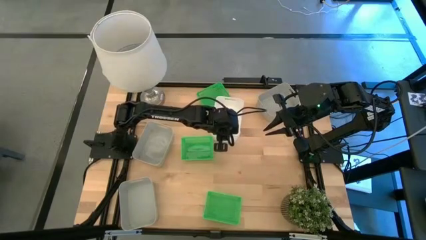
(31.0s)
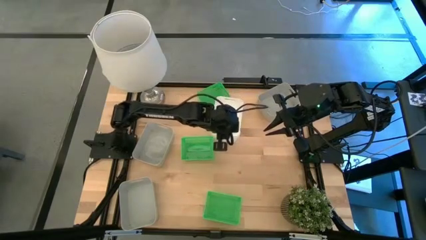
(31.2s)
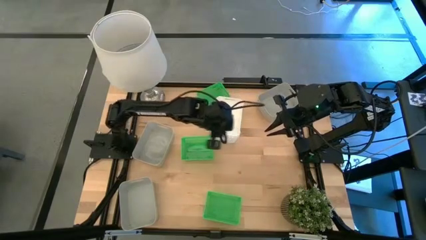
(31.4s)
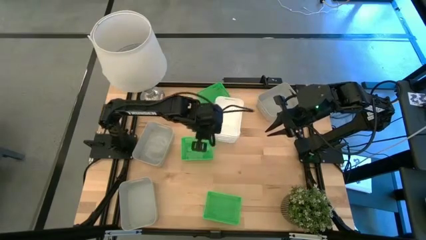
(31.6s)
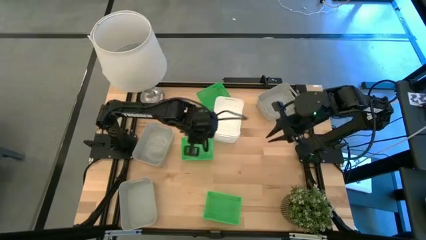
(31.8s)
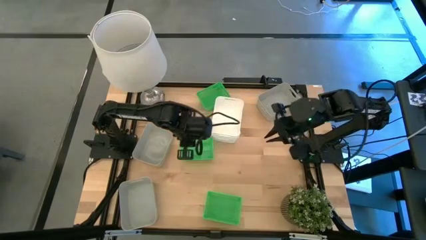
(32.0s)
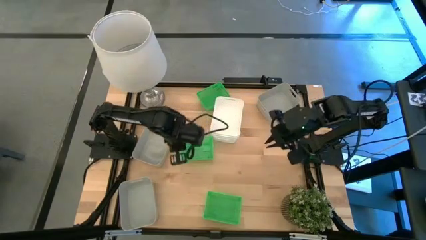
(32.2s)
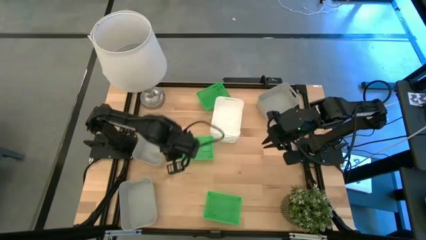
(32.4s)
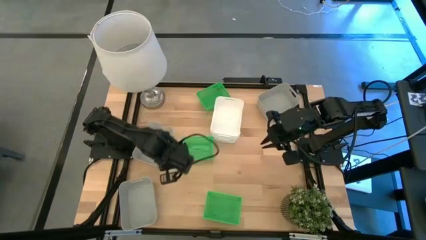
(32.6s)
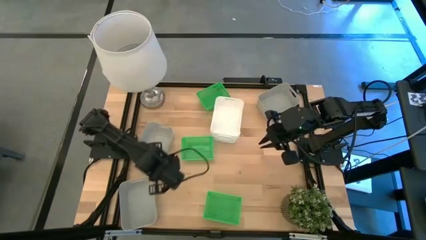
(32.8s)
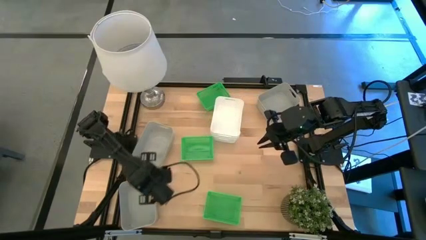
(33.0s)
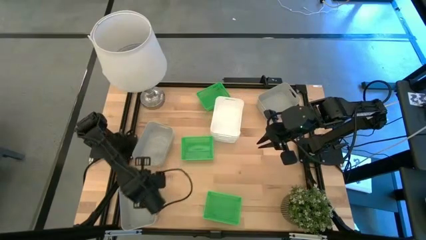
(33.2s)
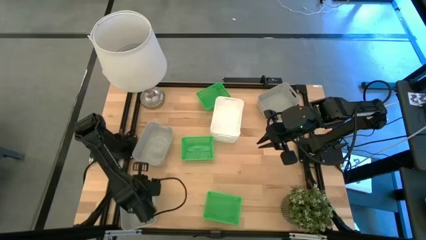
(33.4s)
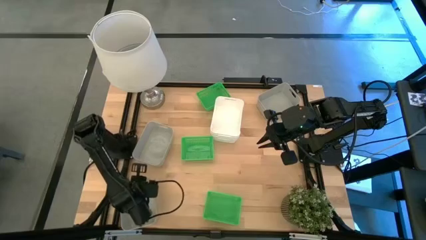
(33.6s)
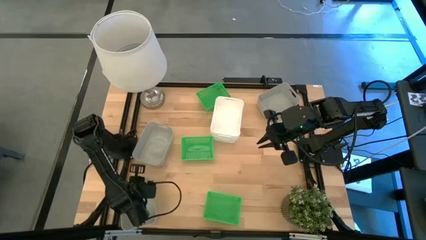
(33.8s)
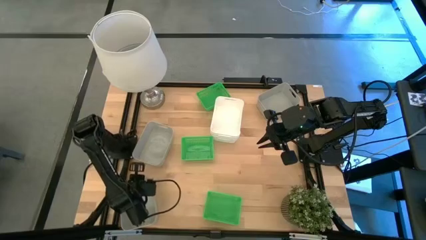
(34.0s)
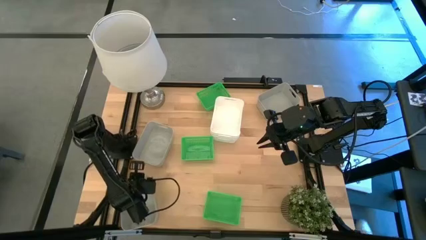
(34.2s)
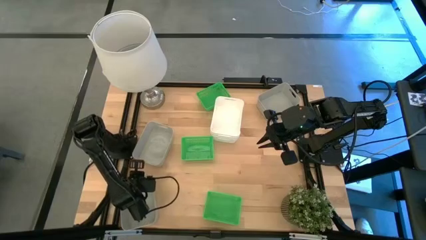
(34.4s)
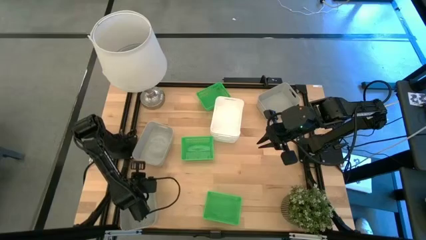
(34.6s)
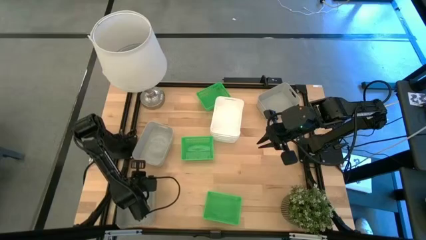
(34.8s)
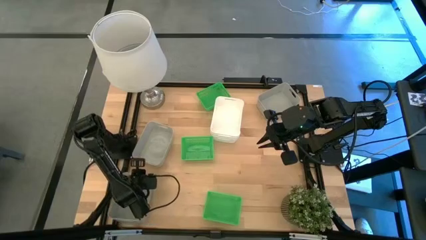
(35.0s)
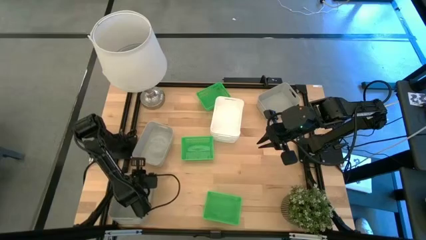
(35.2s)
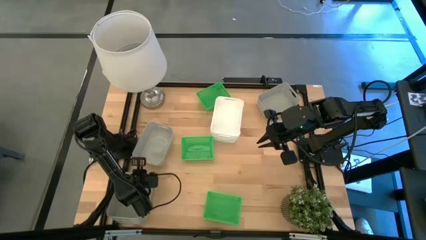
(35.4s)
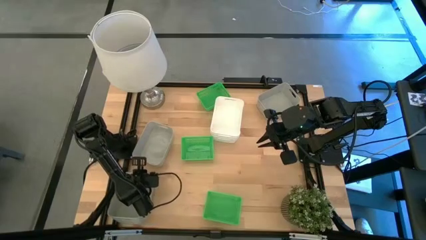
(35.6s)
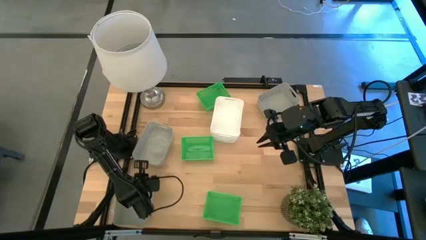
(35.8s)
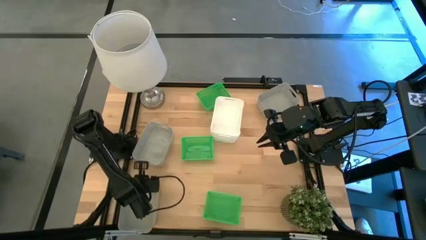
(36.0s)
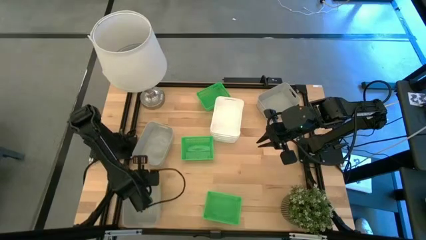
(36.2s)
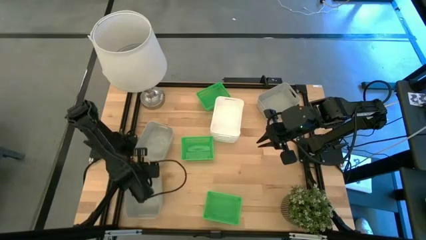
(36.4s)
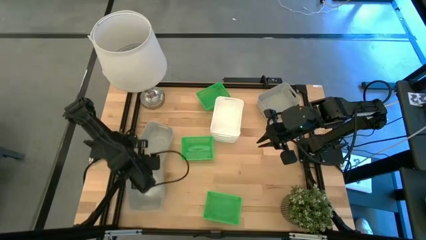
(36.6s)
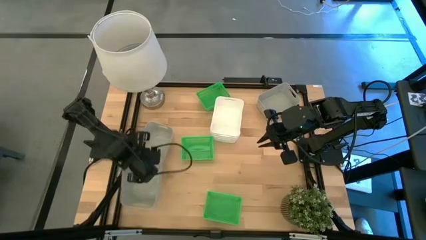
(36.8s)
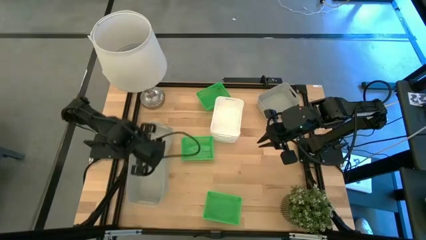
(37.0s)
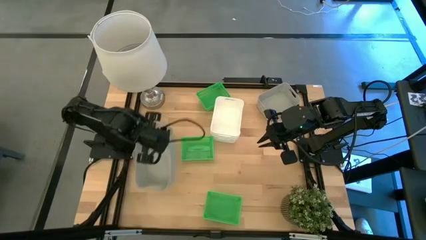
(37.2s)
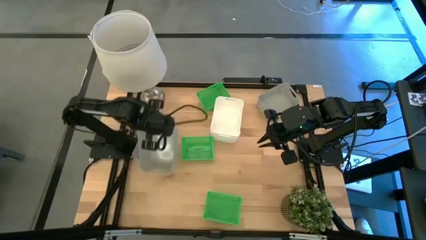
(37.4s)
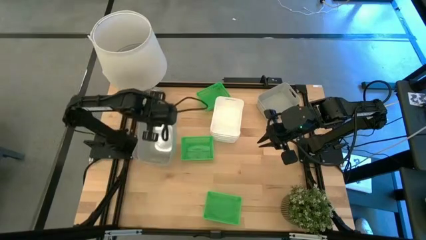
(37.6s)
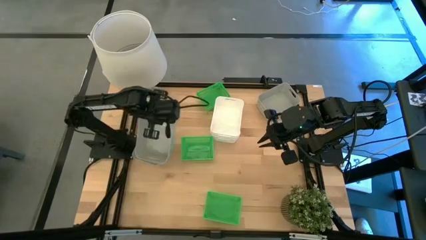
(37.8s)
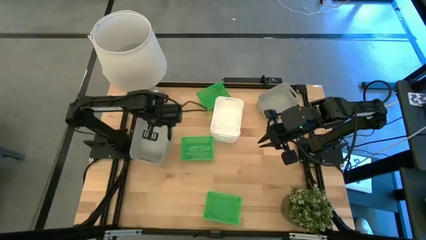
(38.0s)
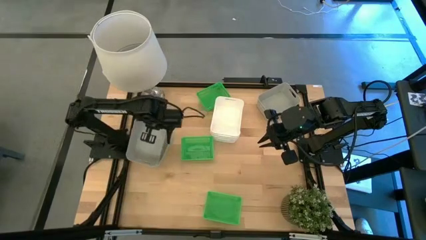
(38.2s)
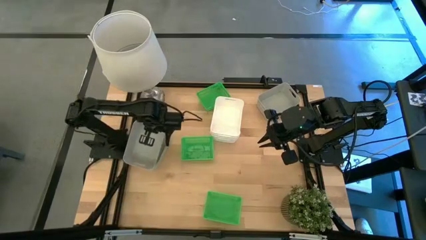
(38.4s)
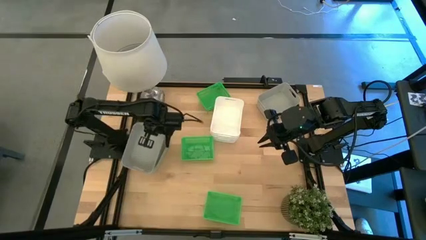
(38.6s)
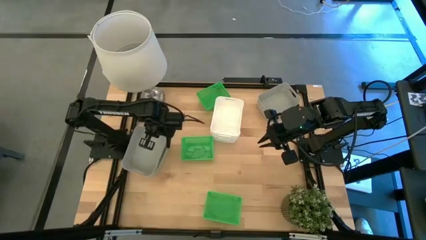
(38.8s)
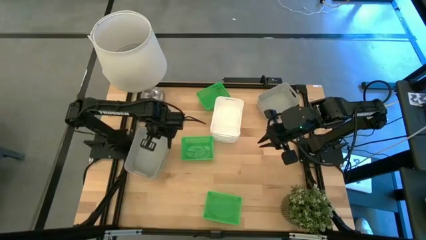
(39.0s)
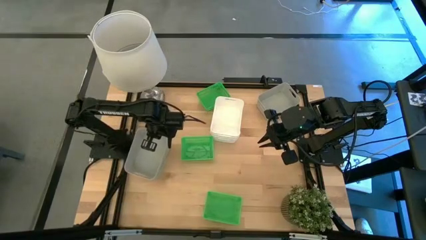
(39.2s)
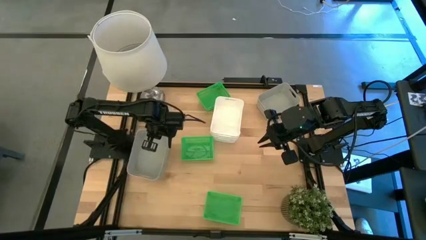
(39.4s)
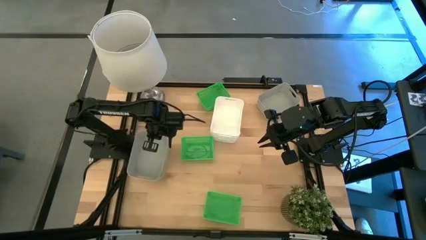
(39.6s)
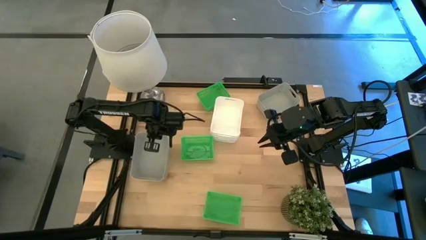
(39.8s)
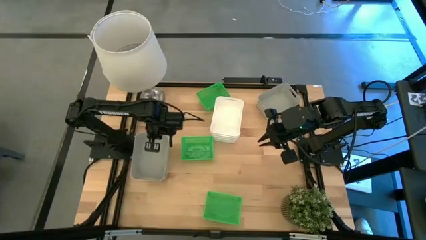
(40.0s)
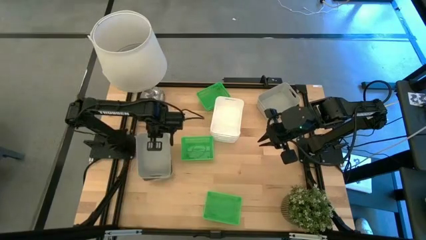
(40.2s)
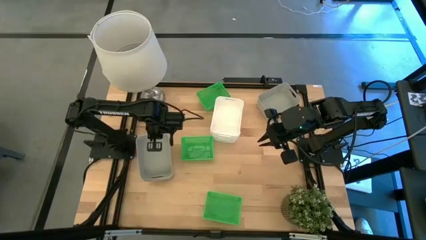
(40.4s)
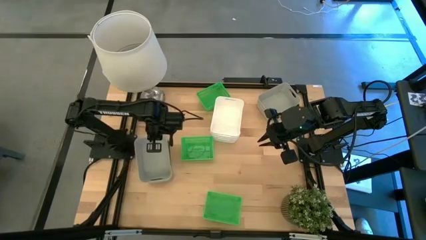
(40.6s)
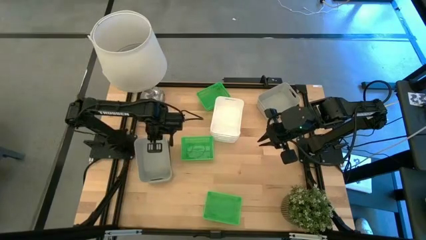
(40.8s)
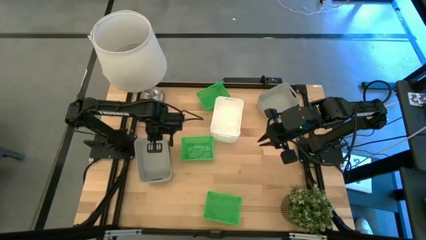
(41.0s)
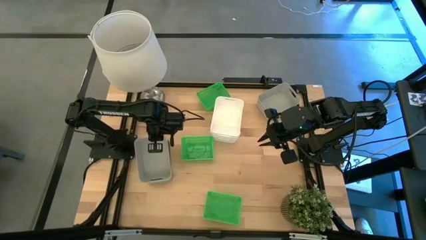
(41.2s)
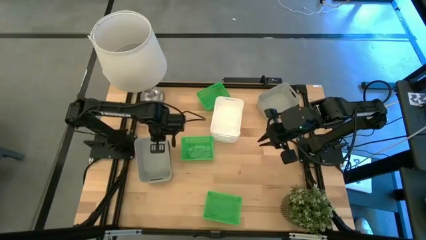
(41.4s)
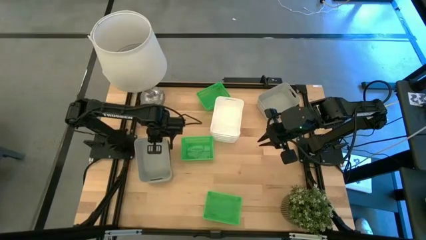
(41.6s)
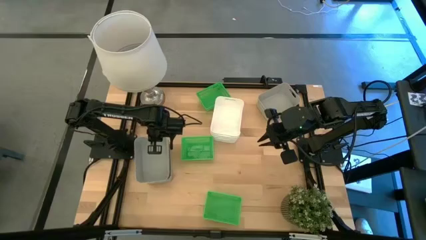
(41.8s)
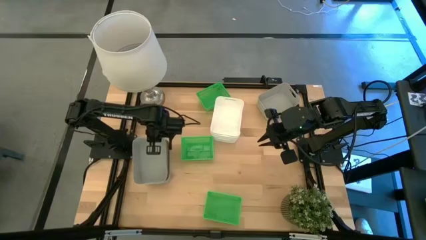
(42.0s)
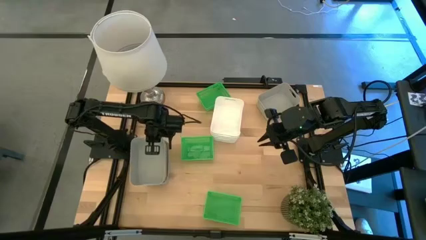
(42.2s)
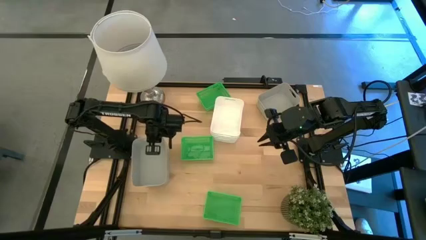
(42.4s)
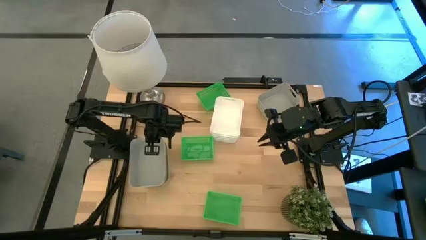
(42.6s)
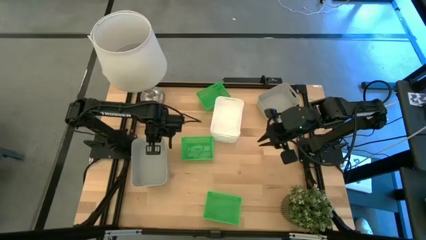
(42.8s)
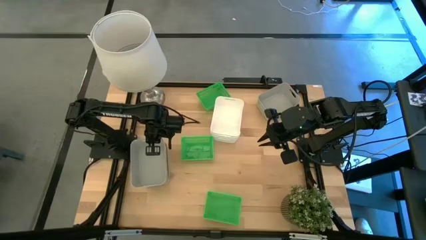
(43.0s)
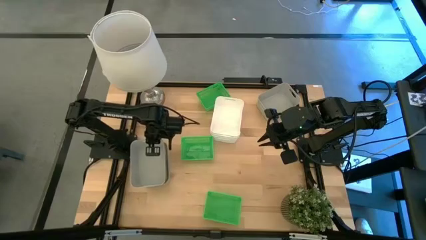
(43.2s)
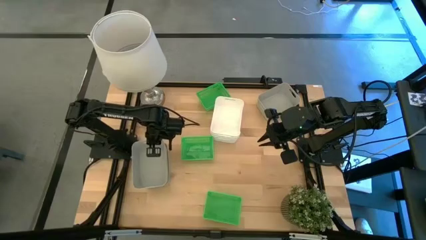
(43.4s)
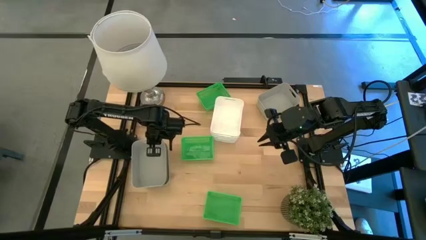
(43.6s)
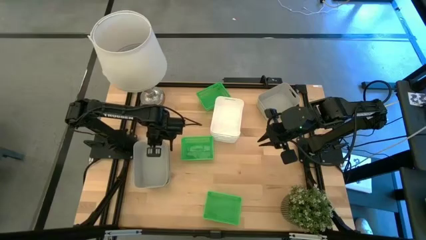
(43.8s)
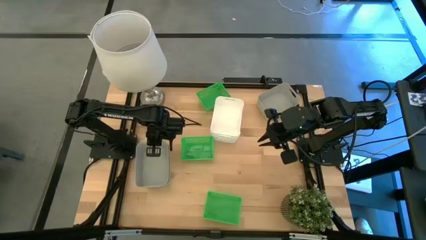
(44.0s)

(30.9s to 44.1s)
Stack the bottom gray bin on top of the middle gray bin
